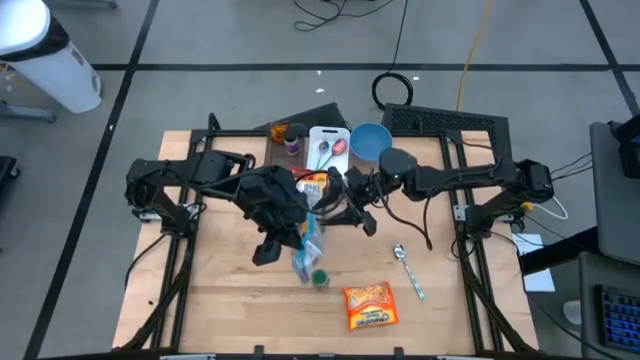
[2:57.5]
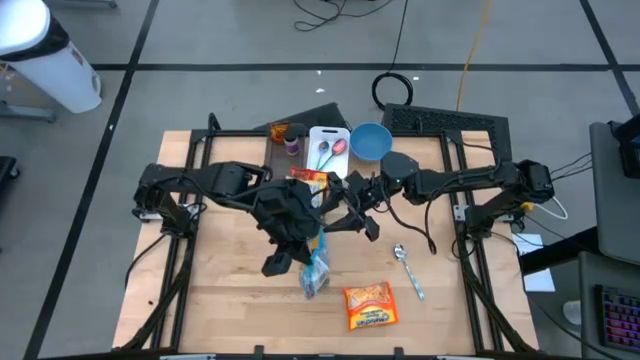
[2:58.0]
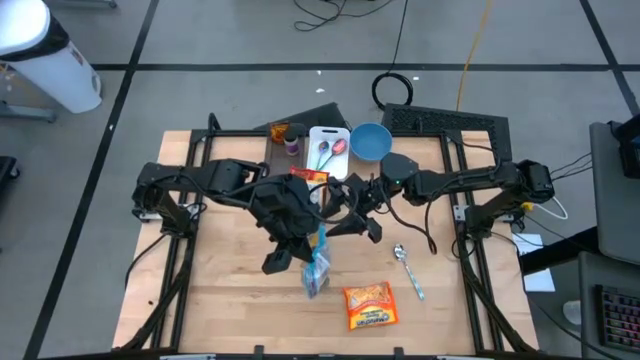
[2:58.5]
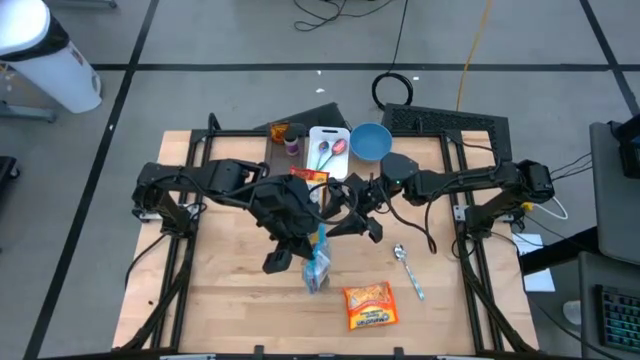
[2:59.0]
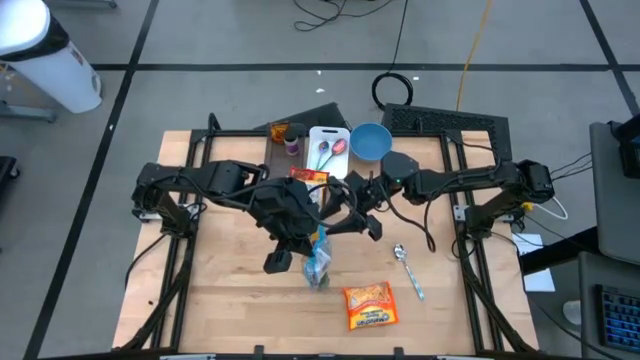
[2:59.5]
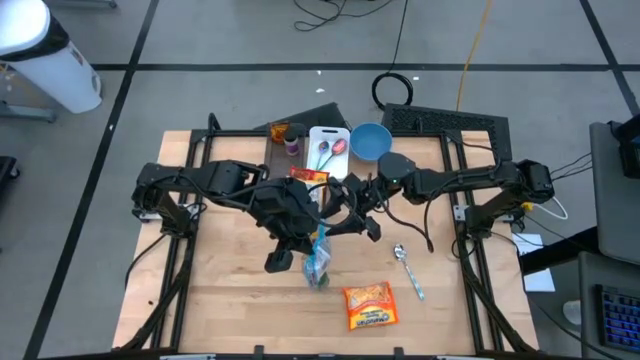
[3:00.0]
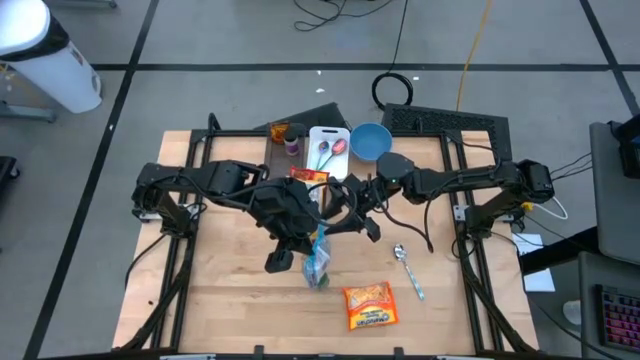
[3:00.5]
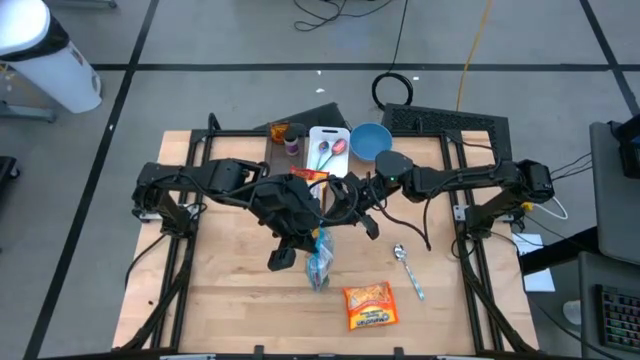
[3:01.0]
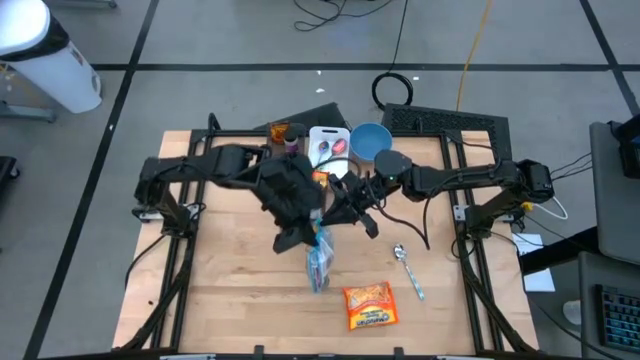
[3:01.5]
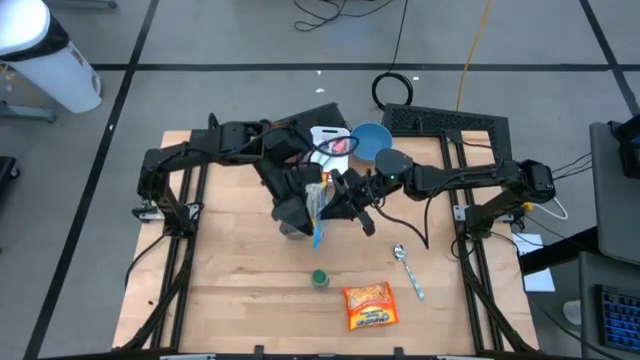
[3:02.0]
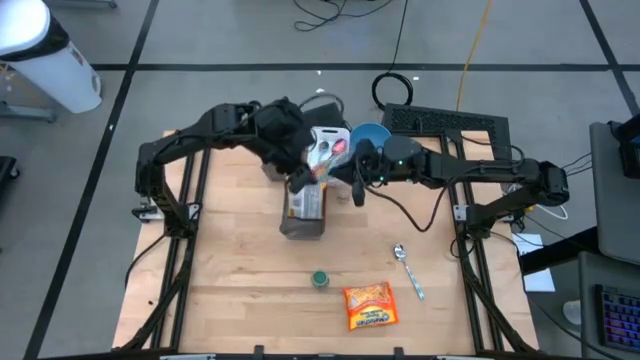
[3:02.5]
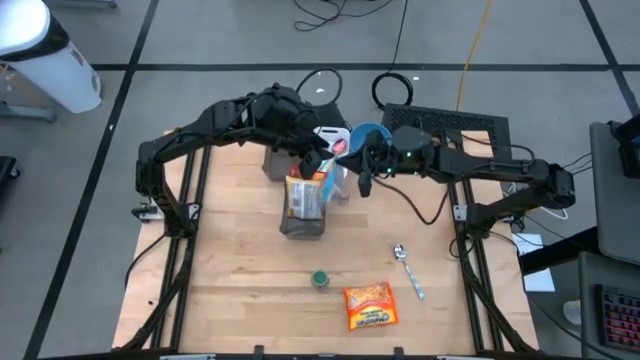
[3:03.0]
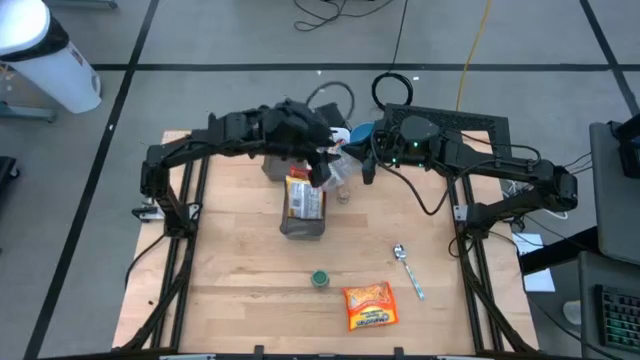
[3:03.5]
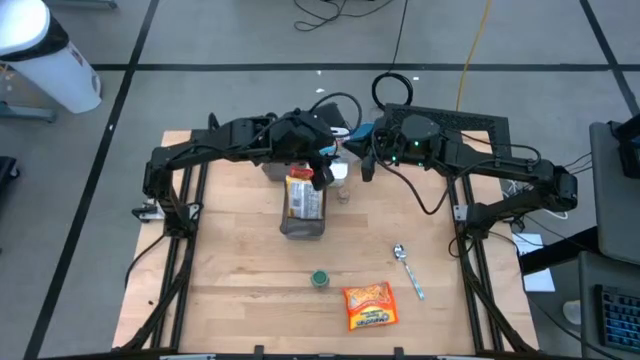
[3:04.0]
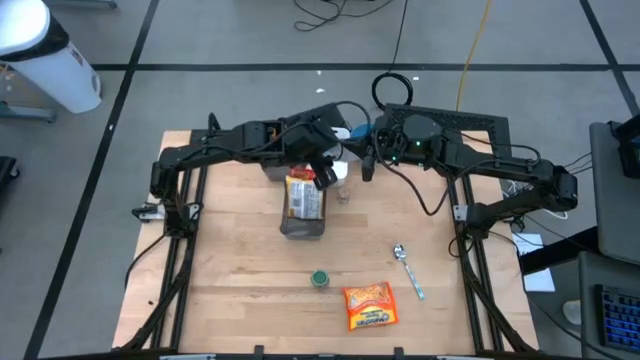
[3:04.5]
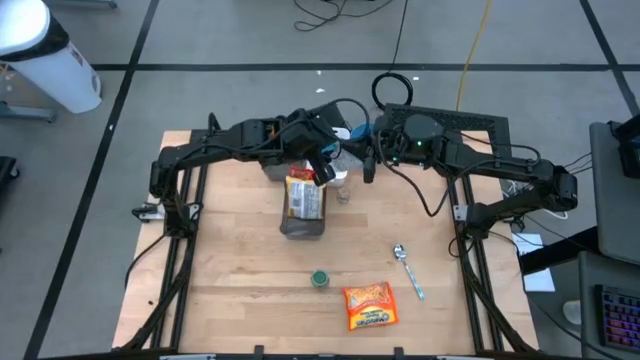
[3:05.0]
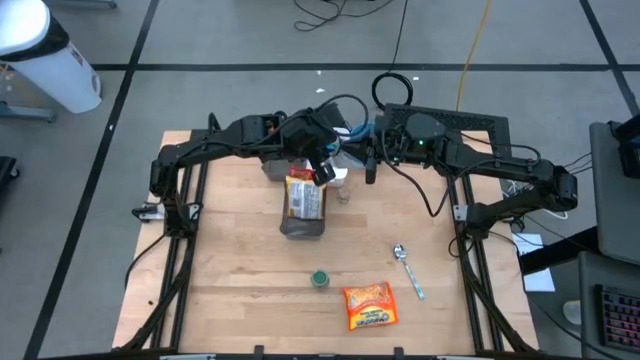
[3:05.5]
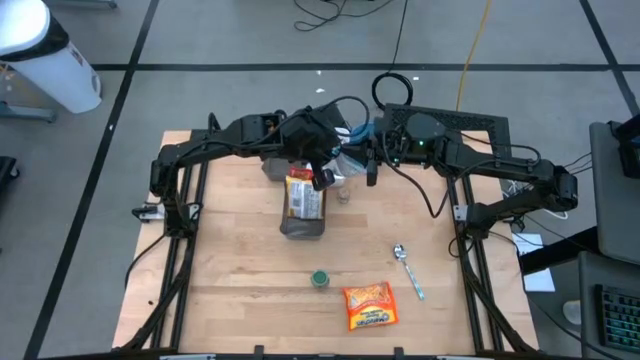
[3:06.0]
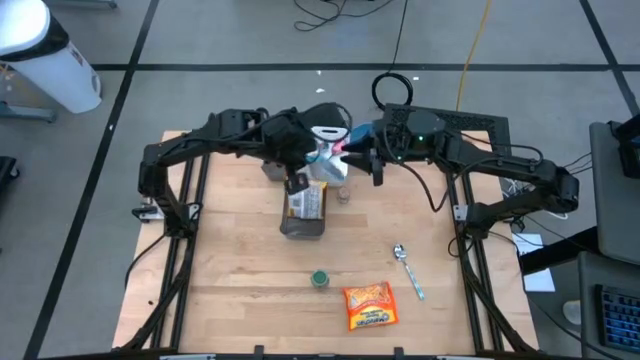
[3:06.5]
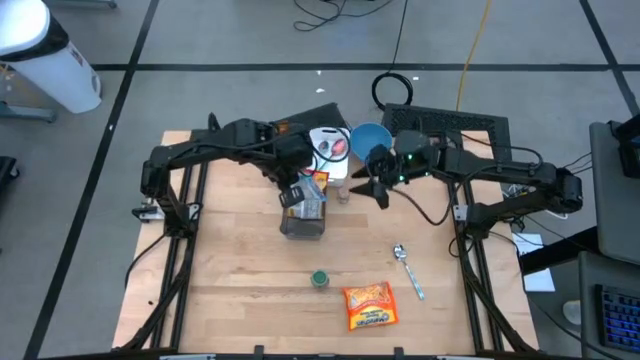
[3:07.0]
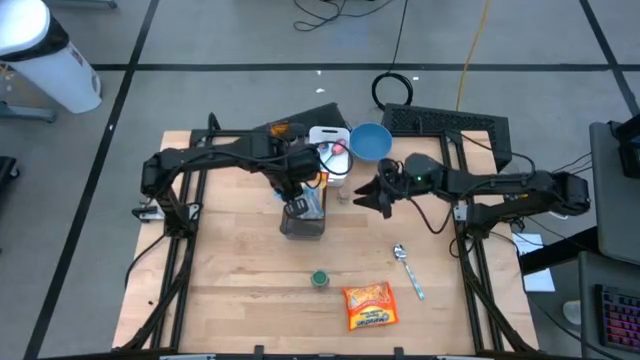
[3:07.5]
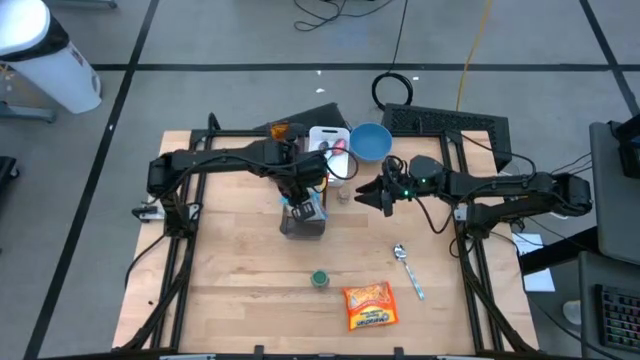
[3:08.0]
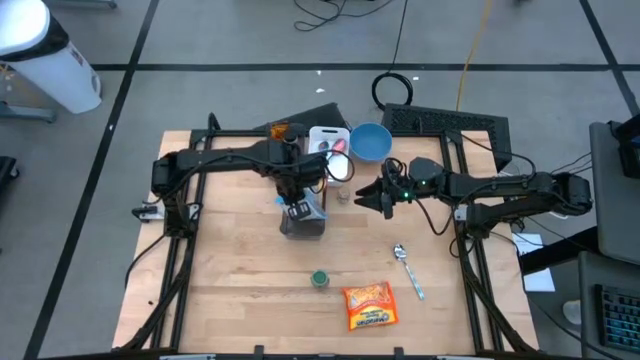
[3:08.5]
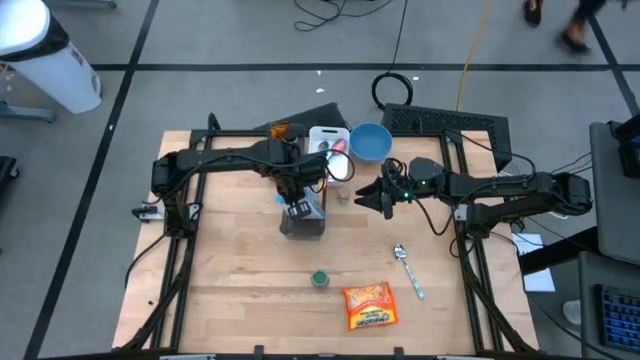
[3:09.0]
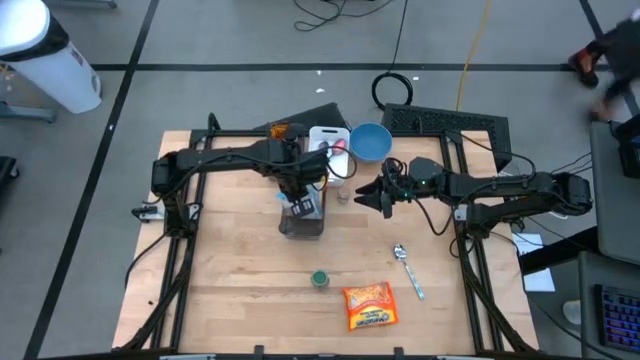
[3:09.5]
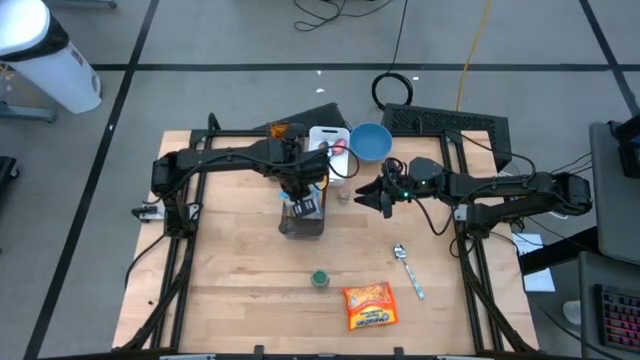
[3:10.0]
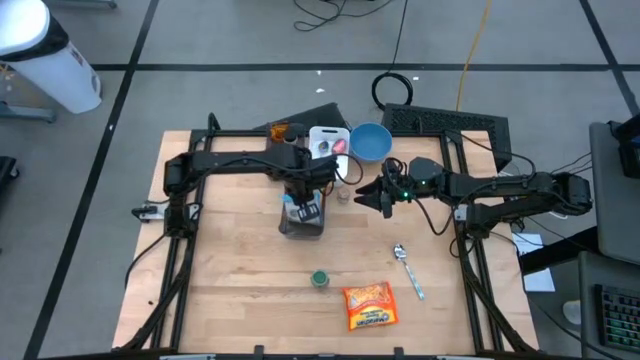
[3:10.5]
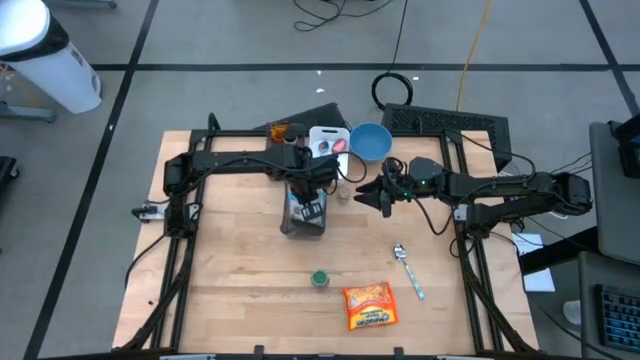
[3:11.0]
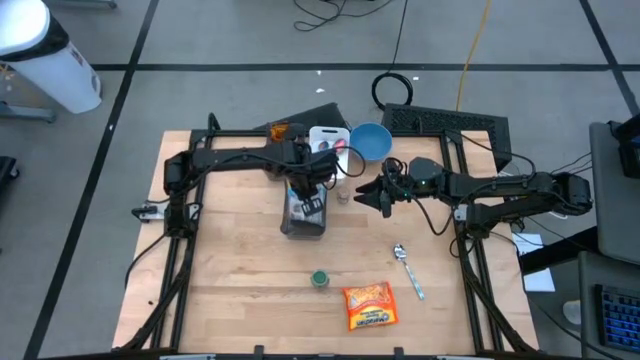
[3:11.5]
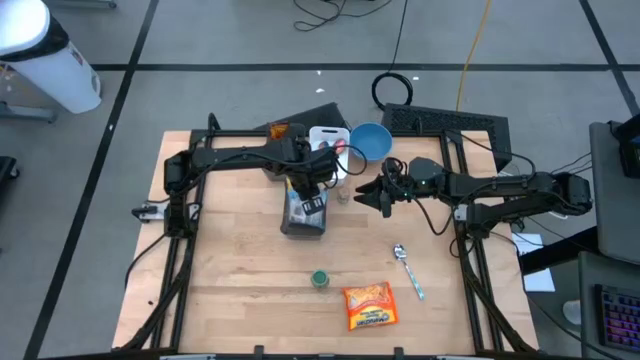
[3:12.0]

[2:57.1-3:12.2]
Task: Pick & Place Food Item
Put the blue noodle pack into the bottom black bin

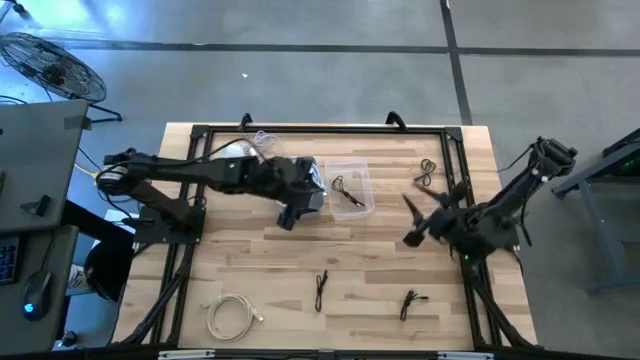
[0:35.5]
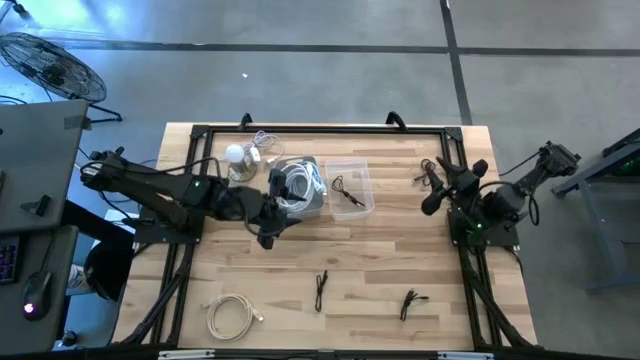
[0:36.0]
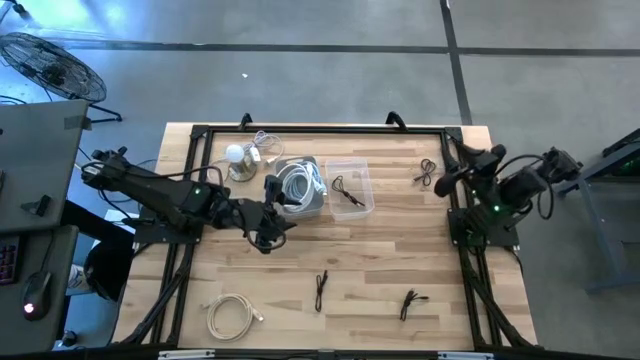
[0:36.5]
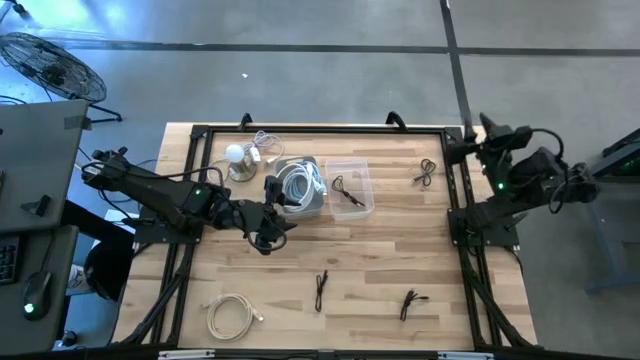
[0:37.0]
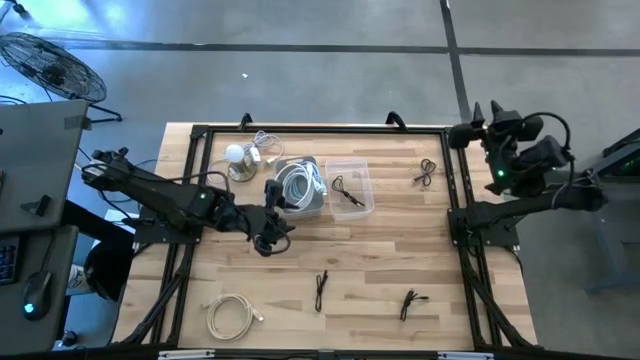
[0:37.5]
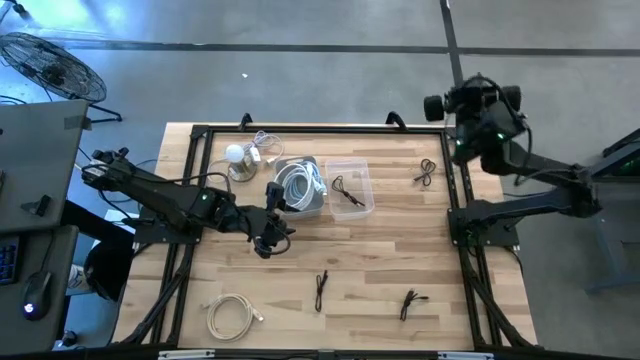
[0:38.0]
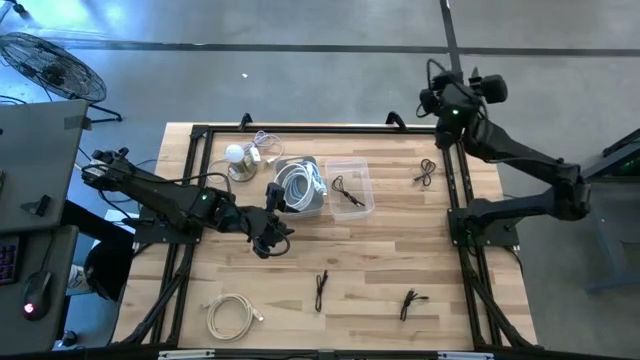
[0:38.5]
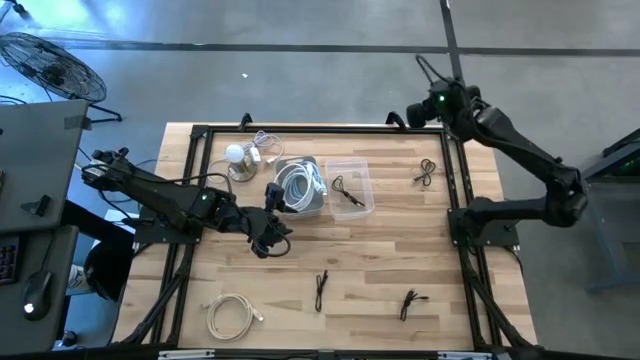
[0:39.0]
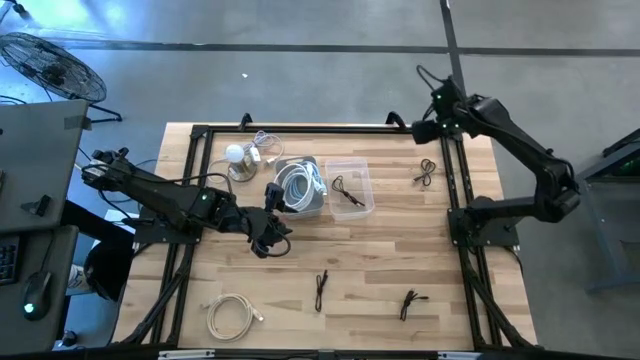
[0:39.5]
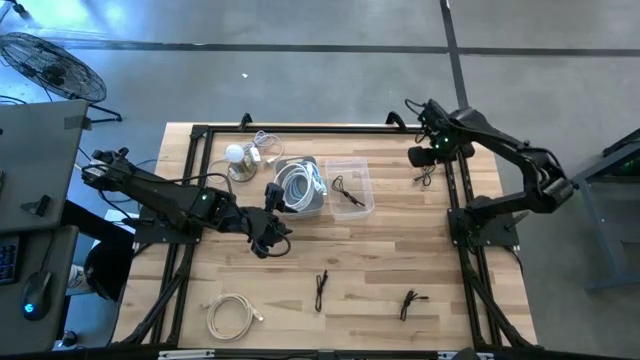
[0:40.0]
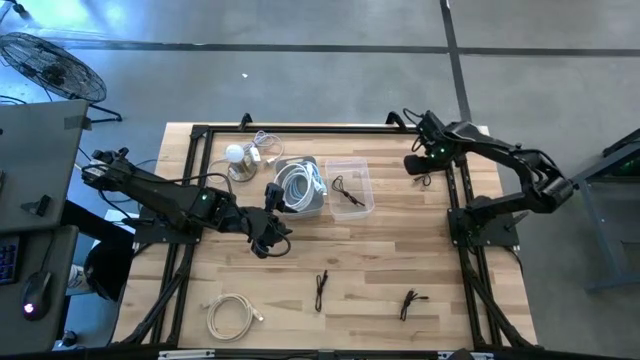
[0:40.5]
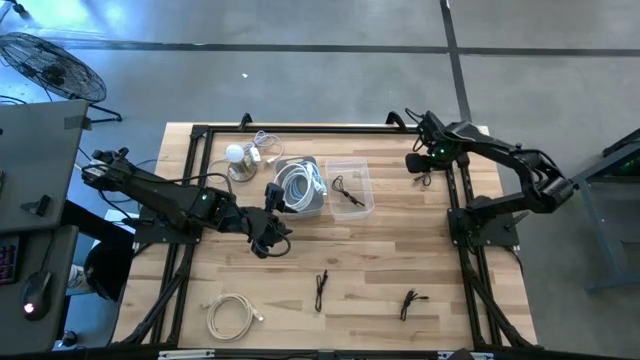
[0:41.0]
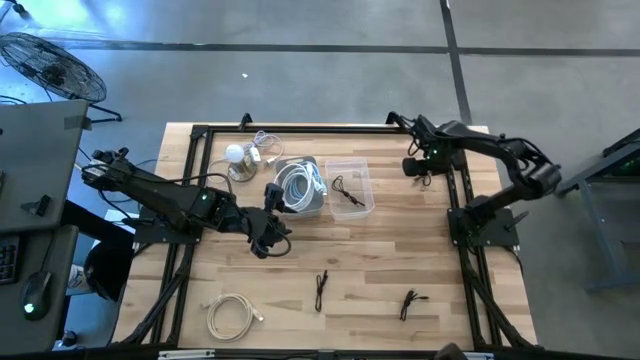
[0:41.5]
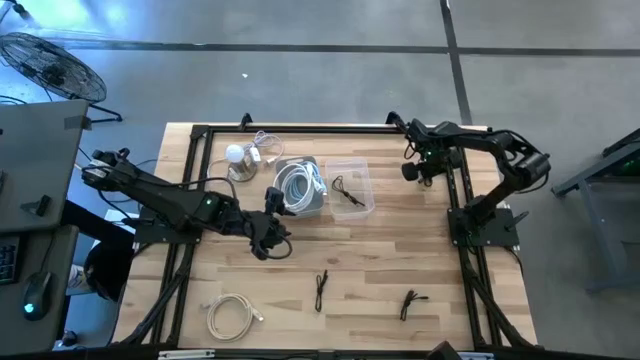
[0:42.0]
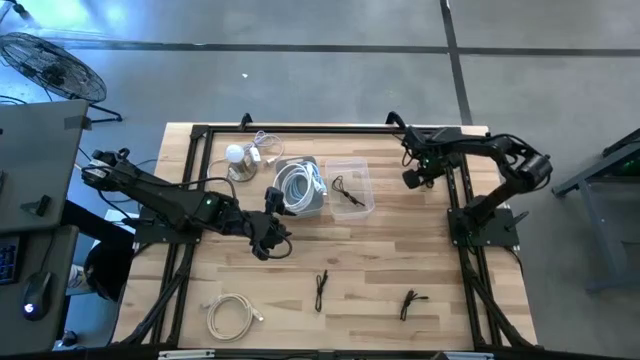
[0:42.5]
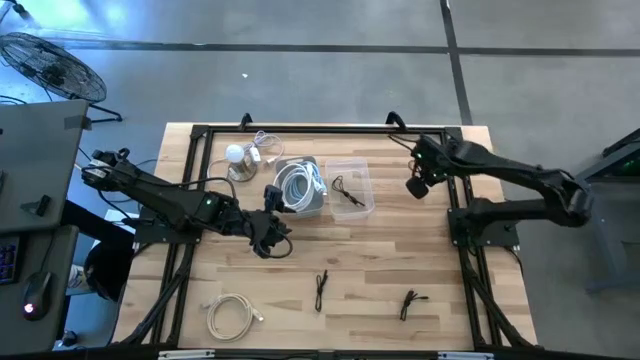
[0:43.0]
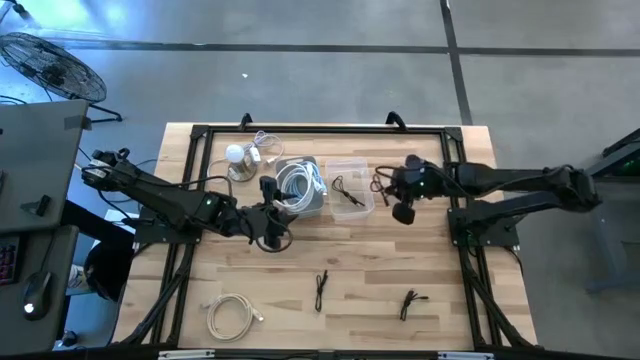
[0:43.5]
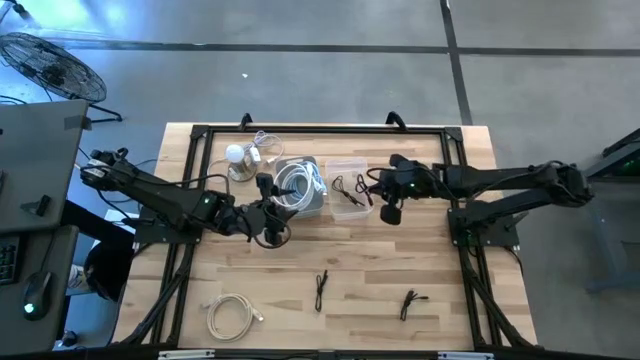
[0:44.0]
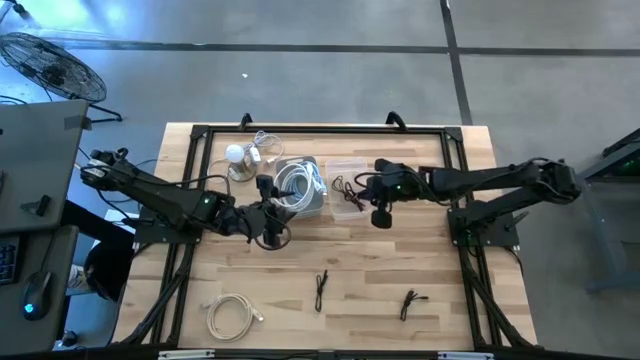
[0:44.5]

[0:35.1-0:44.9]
Task: Pick & Place USB Port
Put the black charger cable into the transparent bin
